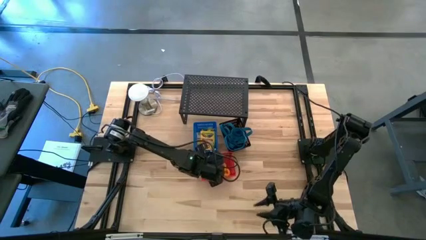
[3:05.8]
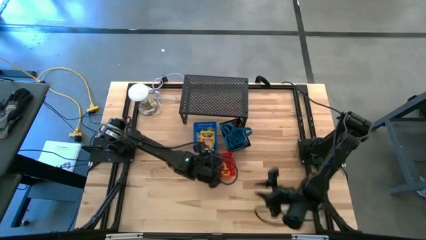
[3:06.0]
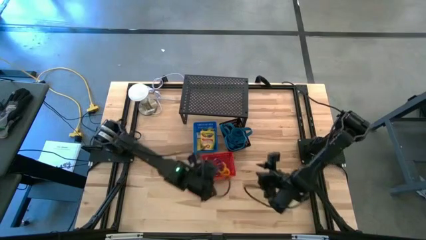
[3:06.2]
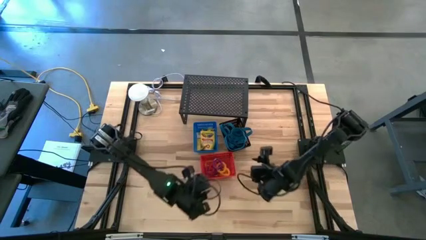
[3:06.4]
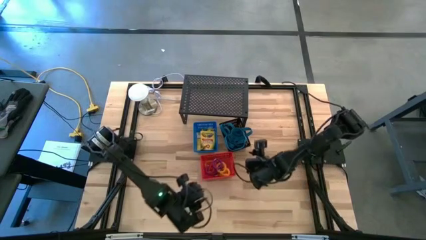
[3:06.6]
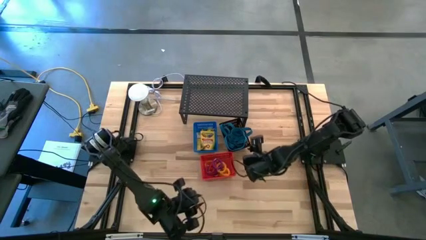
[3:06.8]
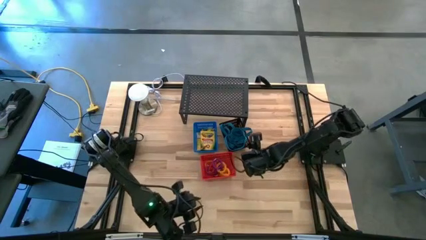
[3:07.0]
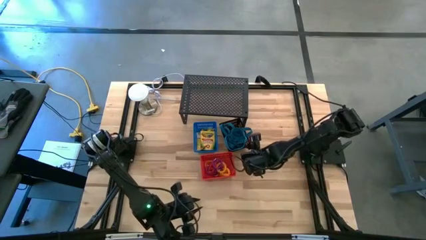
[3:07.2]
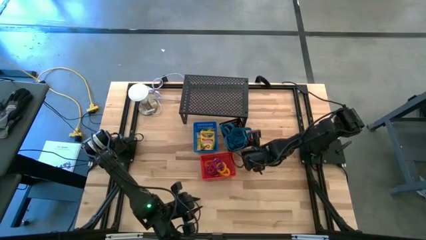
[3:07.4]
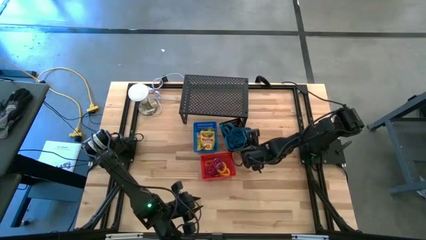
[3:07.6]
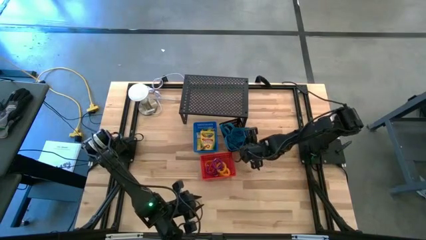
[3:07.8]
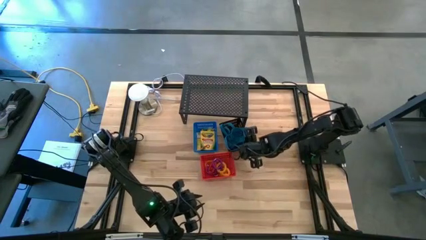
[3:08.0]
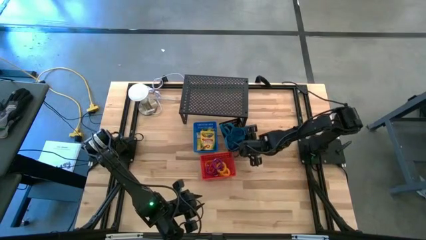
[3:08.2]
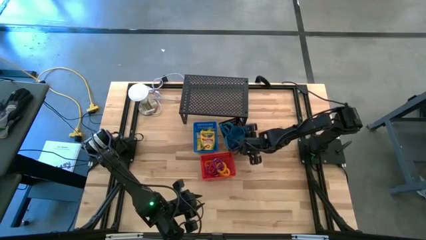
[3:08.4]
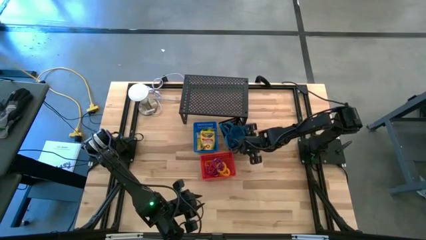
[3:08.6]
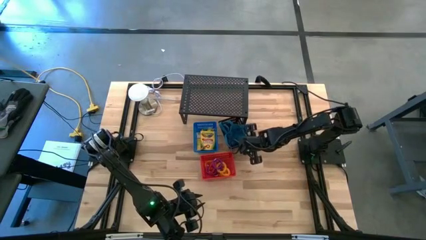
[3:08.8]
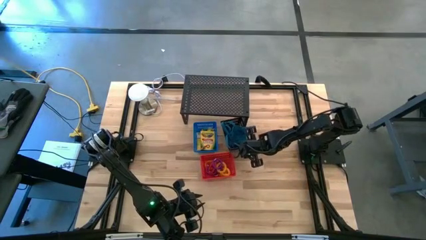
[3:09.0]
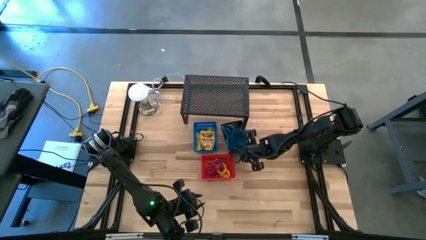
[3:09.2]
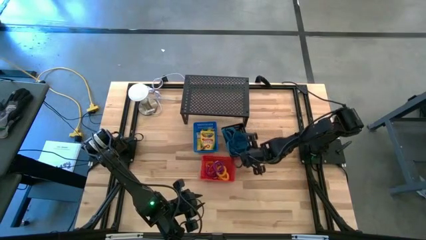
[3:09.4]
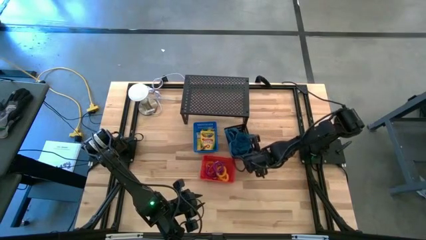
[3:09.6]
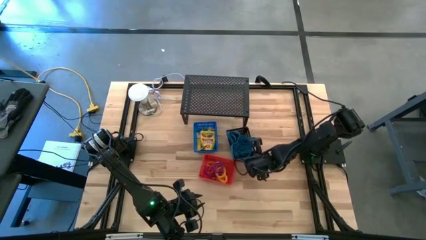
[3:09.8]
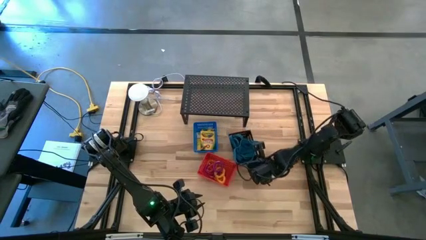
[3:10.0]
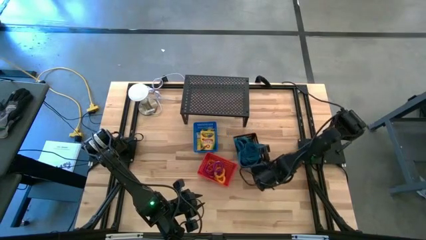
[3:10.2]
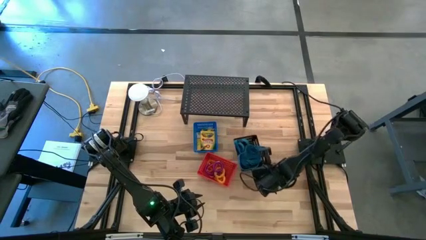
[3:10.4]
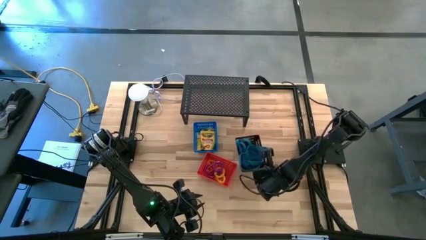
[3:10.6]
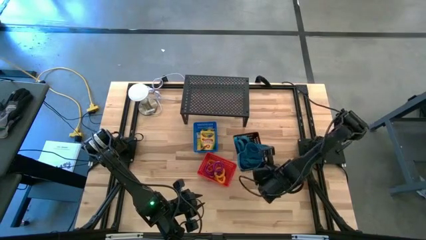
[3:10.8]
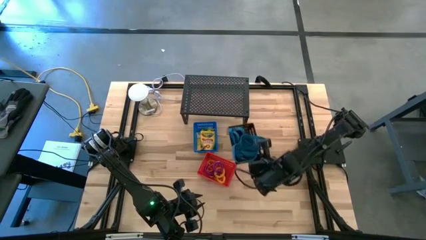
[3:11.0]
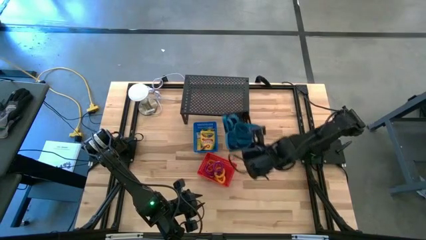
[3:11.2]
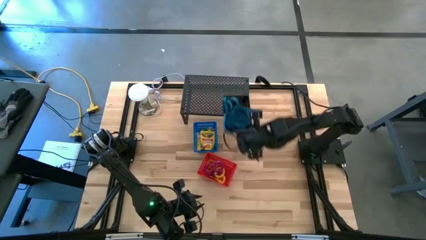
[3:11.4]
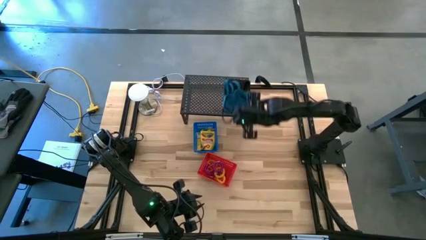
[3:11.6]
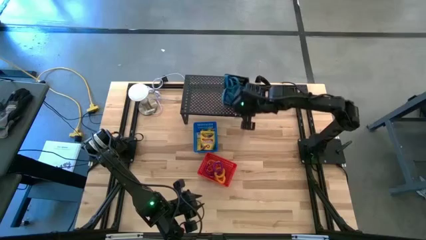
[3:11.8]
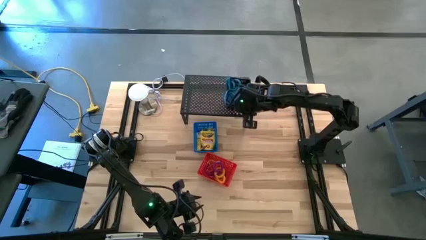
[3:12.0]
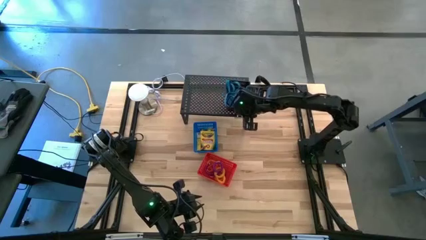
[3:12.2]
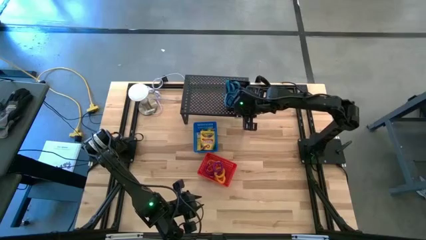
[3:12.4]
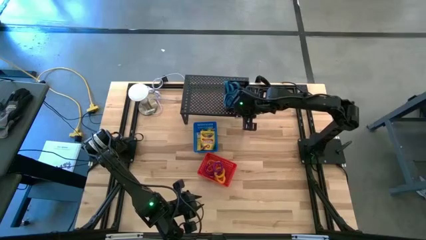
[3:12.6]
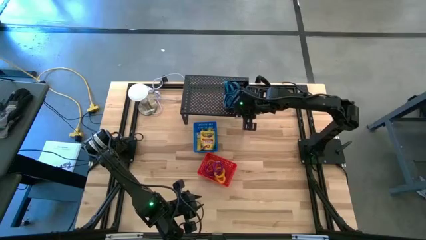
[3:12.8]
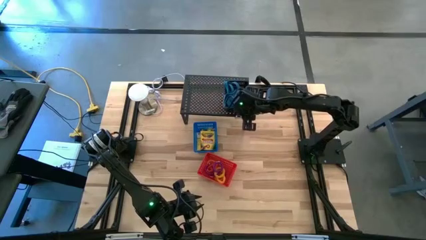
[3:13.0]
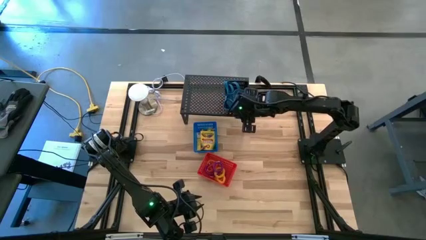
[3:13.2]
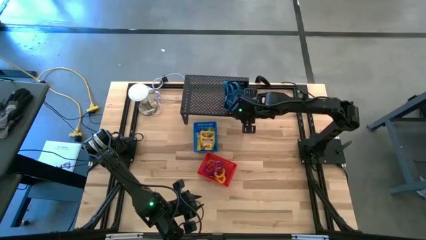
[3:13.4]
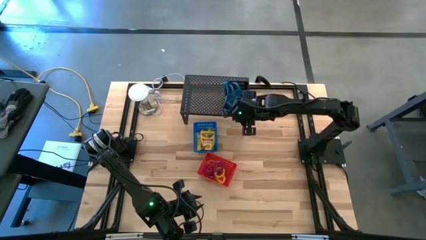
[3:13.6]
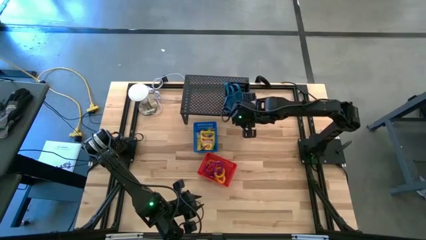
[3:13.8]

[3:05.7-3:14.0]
Task: Pick & Place Office Desk Supplies
Put the black bin on the shelf

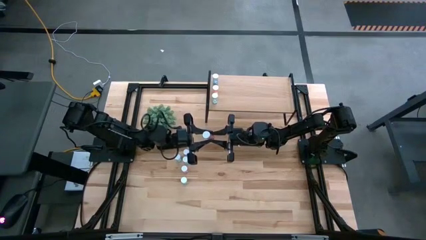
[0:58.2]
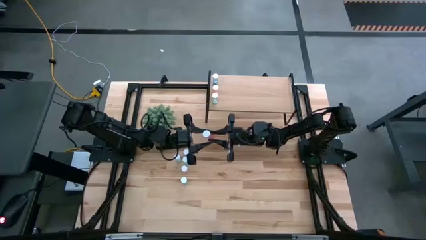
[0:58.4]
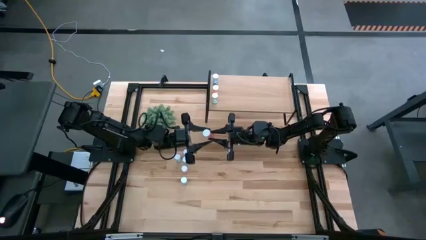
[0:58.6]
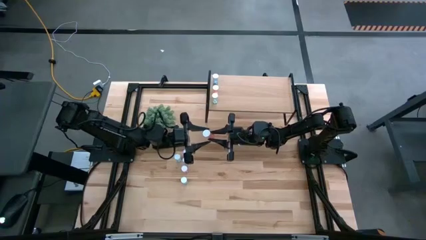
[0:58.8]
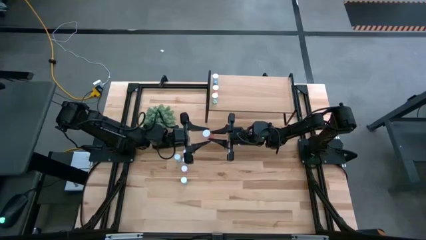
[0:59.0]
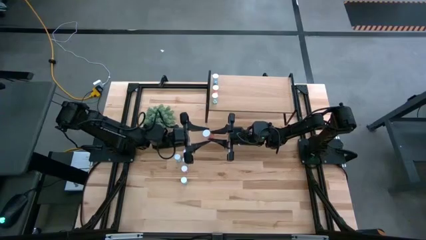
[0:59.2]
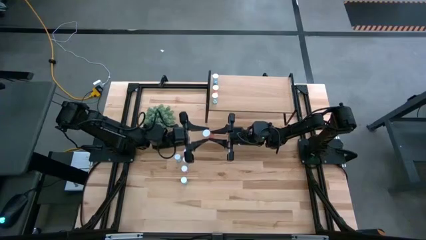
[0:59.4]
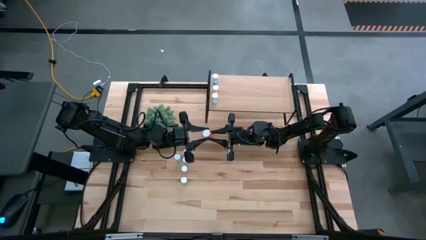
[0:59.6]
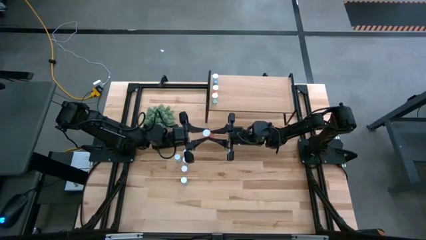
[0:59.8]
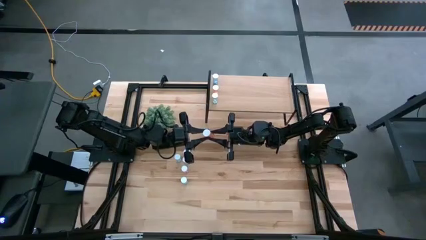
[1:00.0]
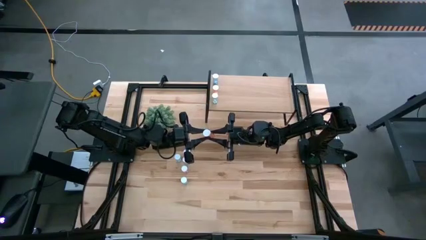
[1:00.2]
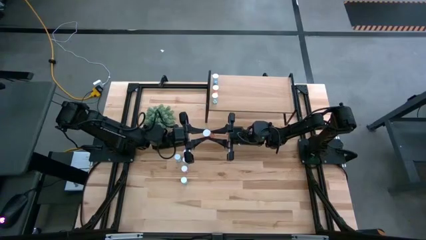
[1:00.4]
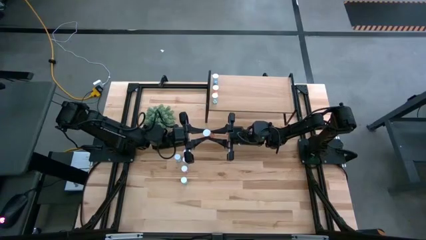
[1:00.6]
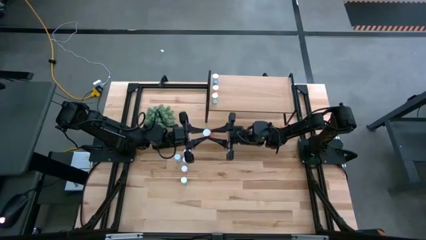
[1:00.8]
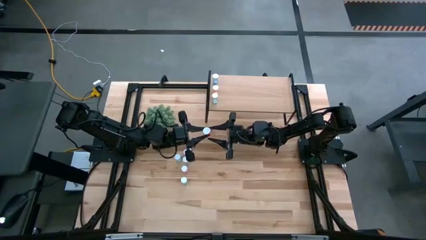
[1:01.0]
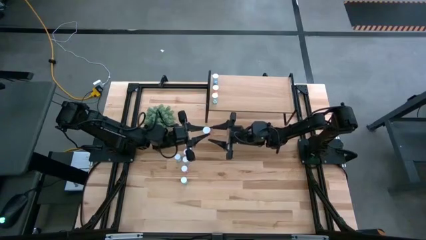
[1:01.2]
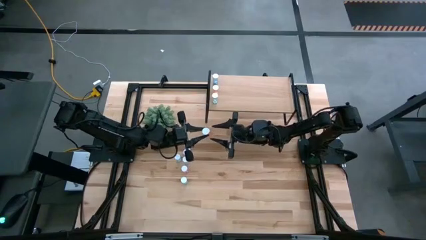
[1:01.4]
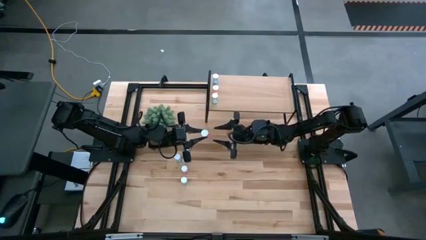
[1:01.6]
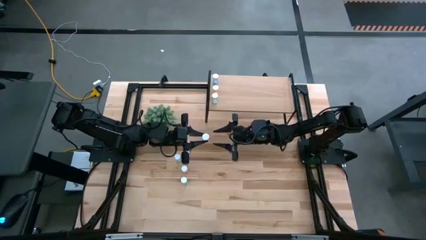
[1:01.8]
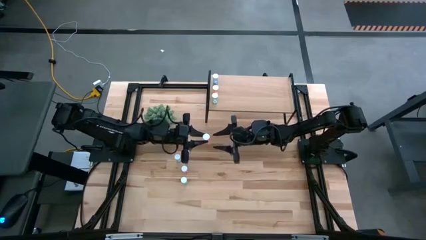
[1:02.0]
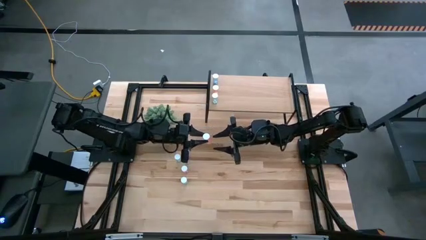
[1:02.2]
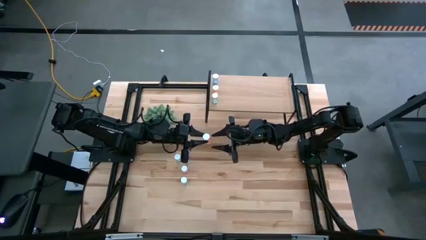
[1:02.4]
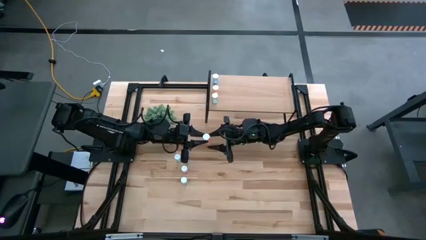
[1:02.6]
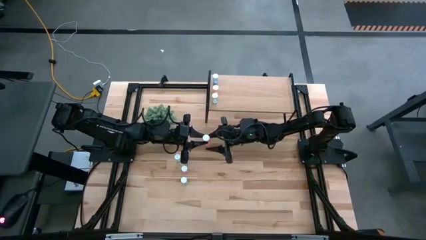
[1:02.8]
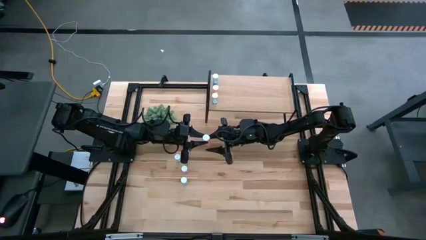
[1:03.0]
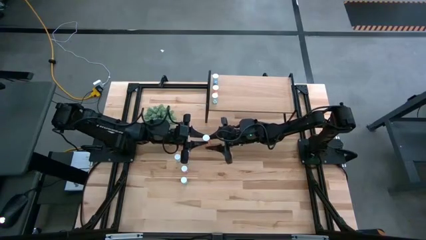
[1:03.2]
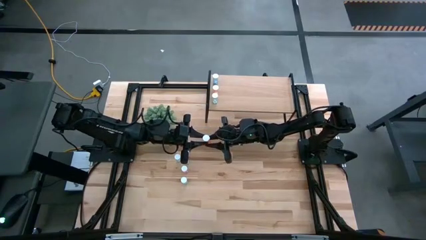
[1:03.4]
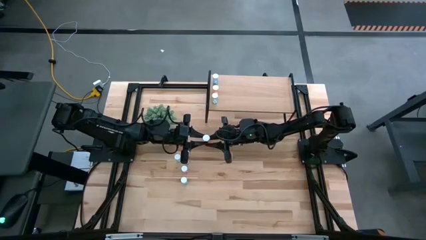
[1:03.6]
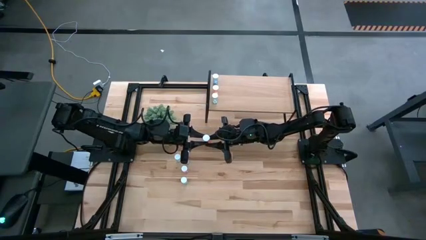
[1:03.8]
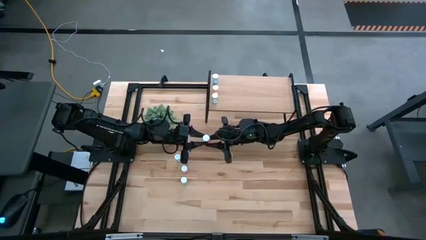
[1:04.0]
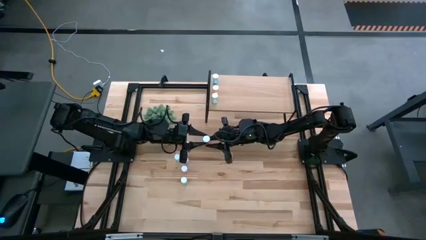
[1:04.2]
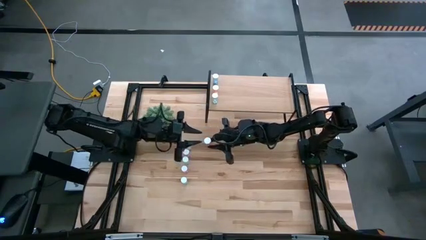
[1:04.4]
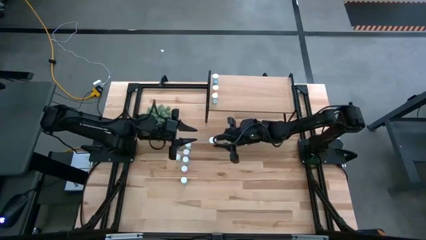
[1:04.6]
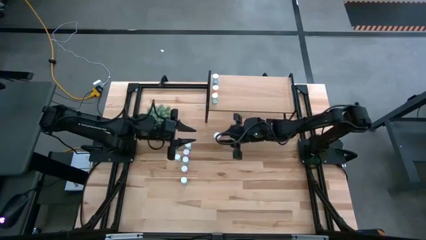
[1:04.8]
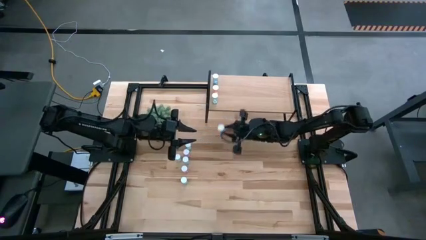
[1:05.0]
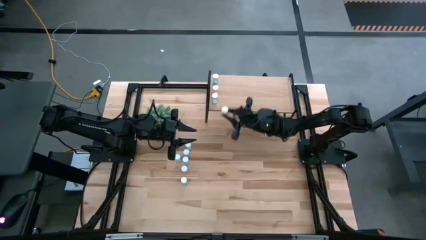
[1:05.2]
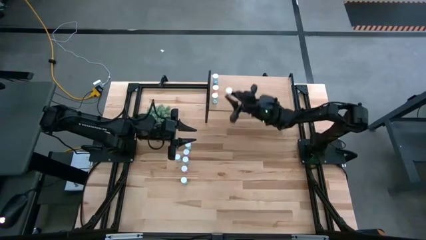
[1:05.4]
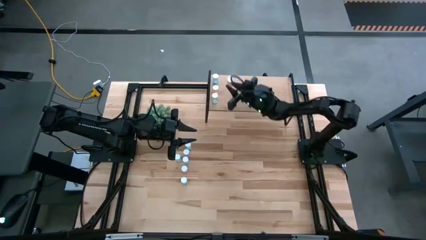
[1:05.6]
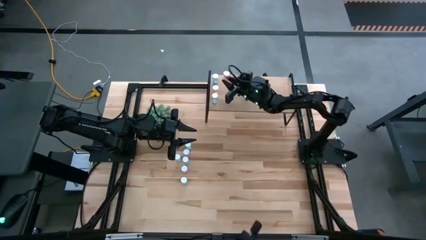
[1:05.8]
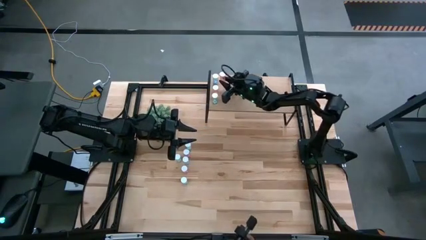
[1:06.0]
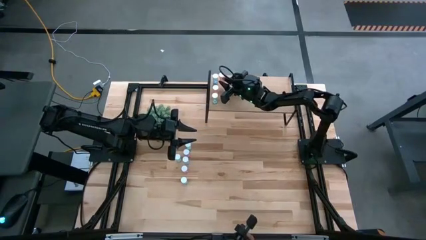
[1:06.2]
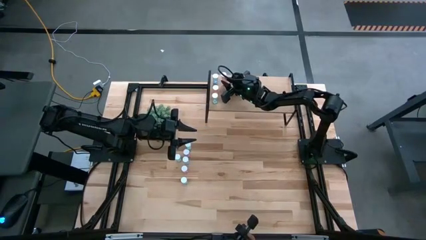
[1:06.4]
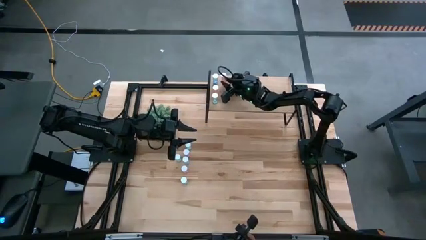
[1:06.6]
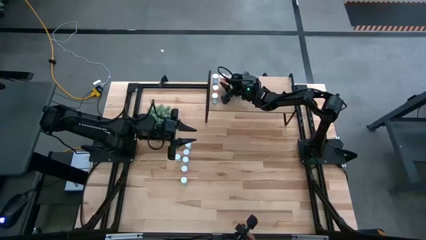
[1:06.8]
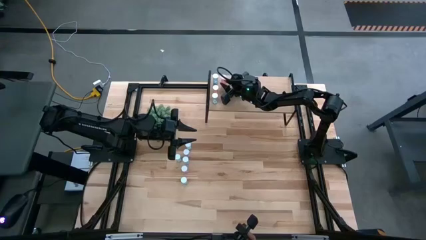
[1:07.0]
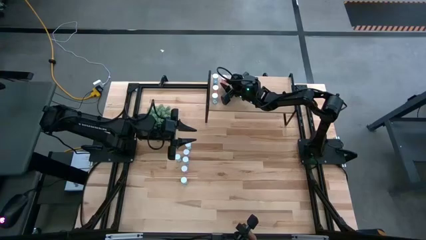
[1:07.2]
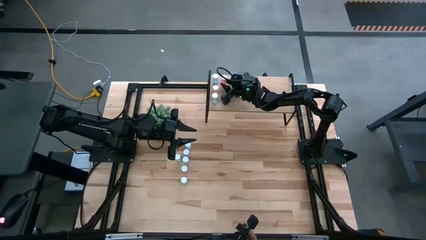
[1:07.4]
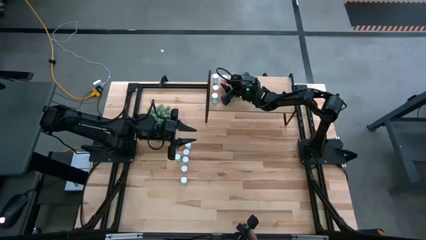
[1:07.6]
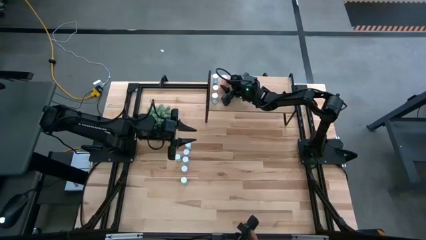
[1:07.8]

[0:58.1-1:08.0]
Task: Pick and place medicine bottles onto shelf by color
Put the transparent orange medicine bottle on the shelf
